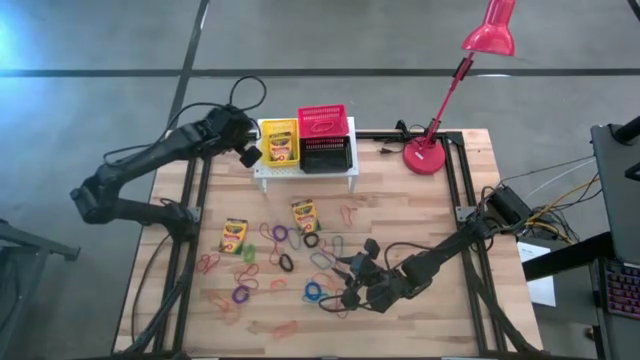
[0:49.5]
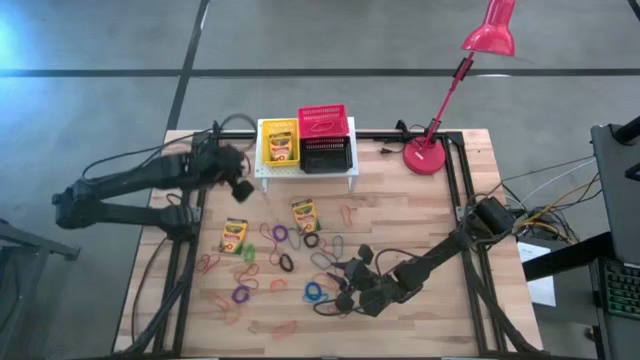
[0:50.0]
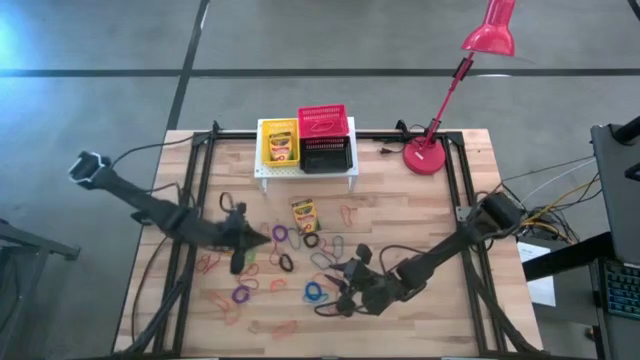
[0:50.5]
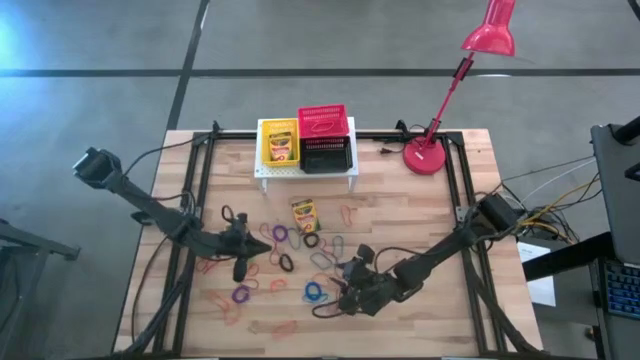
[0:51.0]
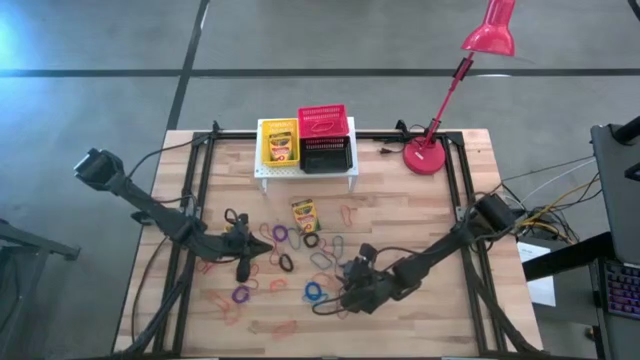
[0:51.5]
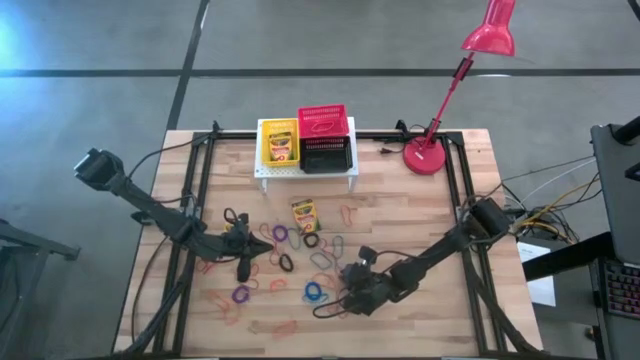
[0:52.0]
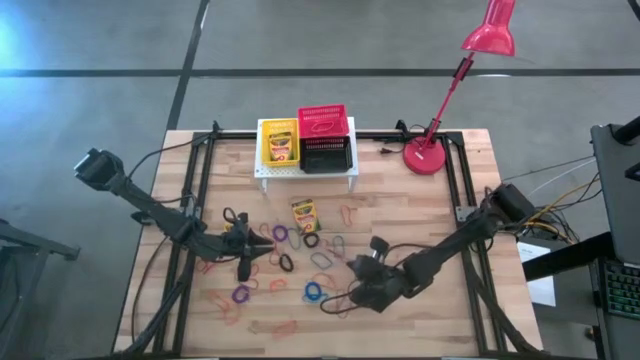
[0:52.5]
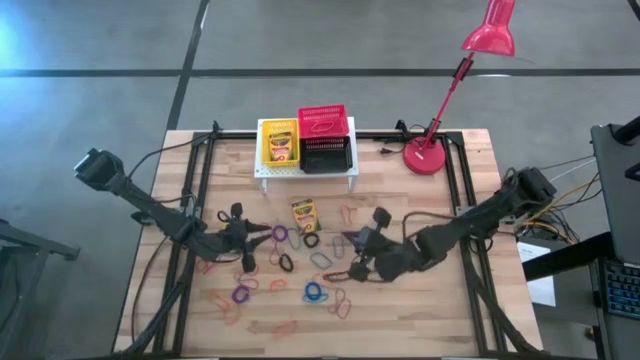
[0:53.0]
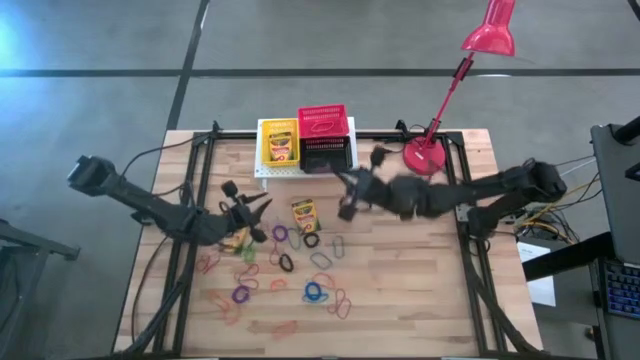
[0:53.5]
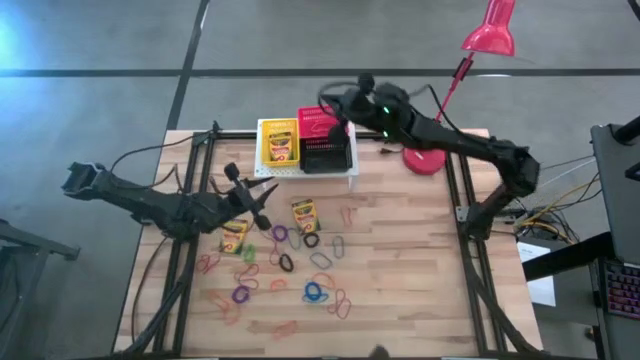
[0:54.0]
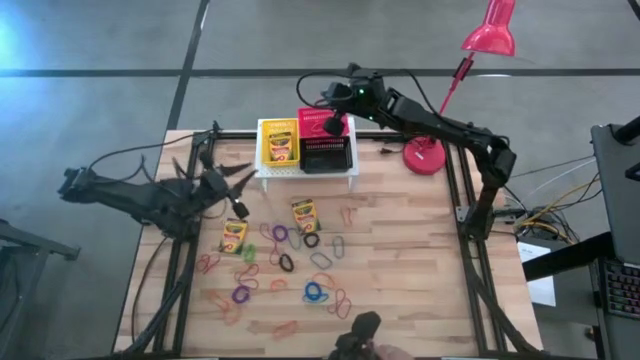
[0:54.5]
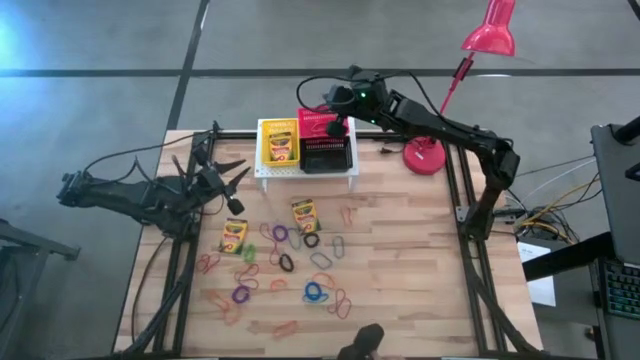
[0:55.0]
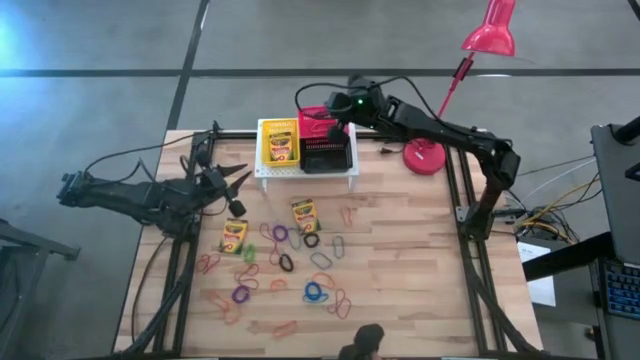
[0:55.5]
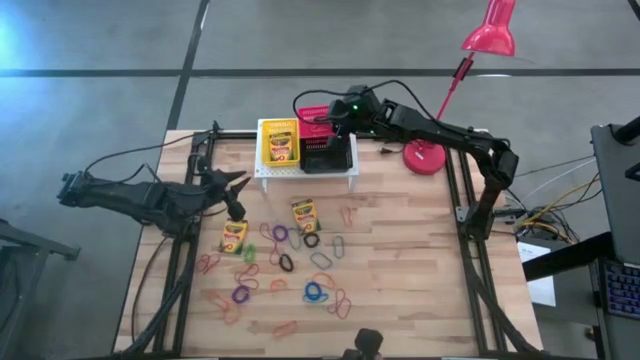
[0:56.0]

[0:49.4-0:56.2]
Task: Pick & Place Office Desk Supplies
Put the red rubber band into the red bin

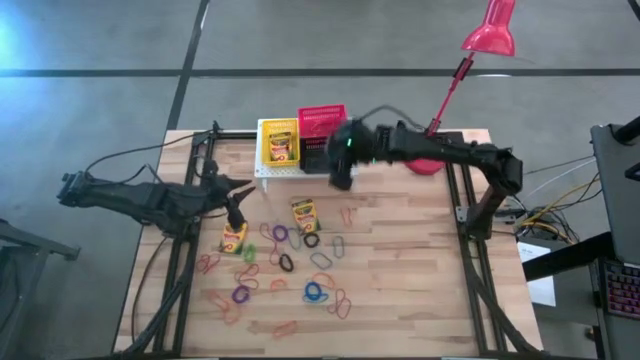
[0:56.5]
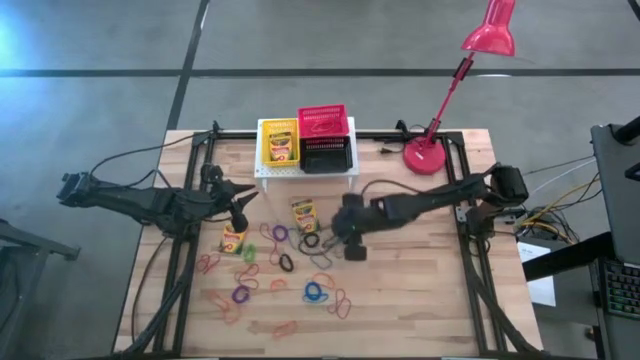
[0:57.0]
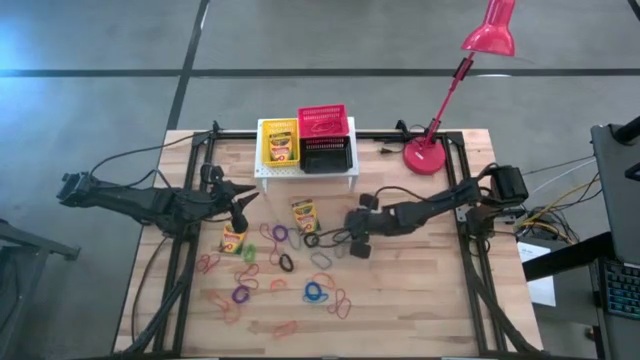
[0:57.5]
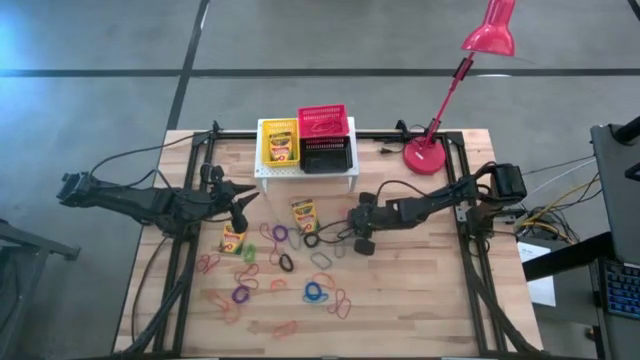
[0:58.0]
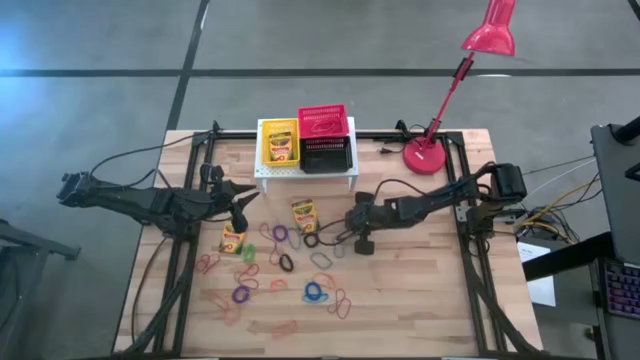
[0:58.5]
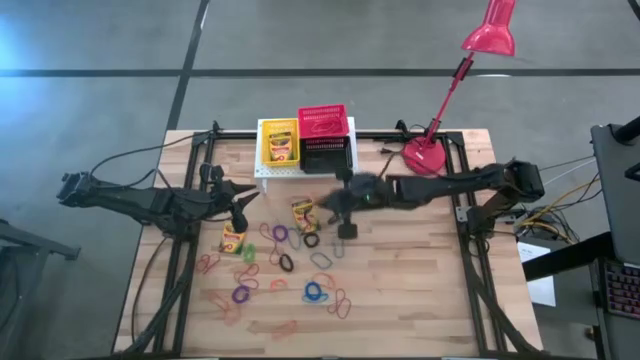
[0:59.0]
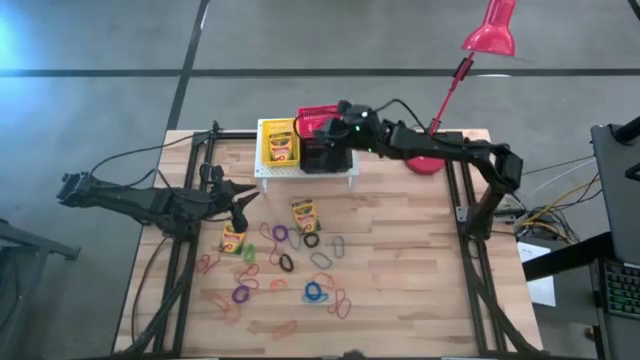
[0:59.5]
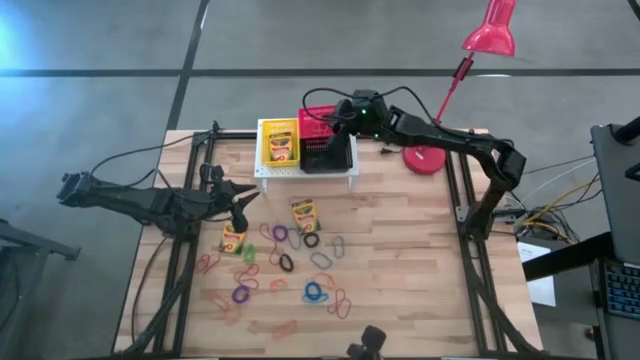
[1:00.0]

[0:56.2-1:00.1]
Put the orange rubber band into the red bin

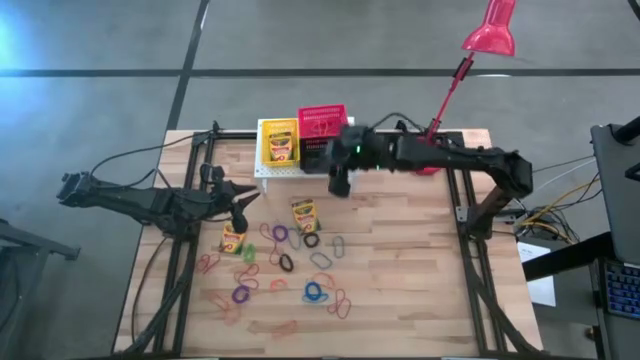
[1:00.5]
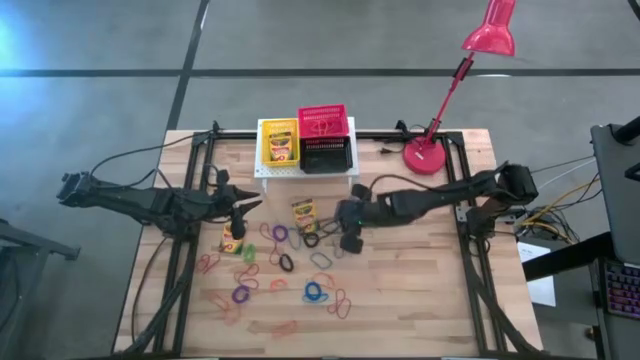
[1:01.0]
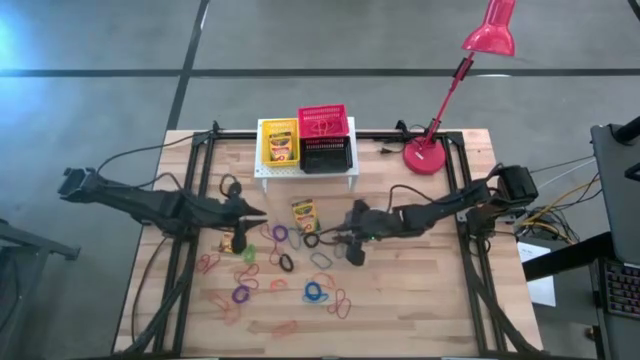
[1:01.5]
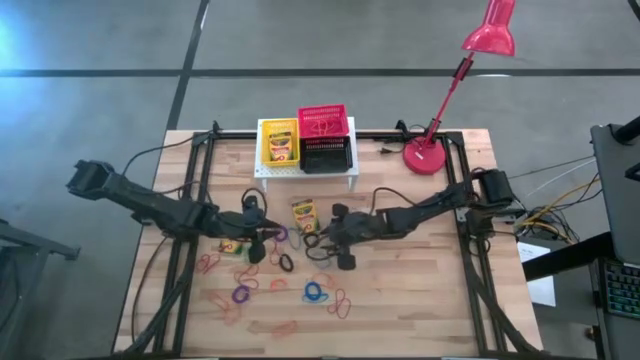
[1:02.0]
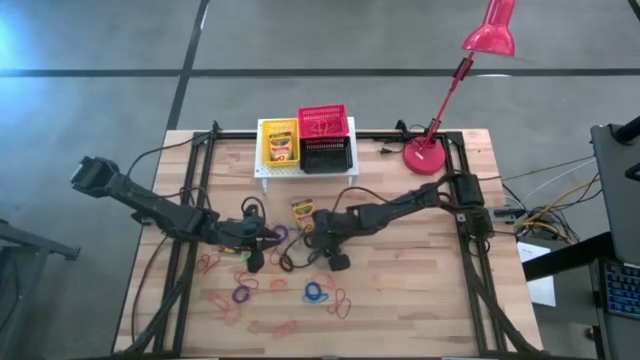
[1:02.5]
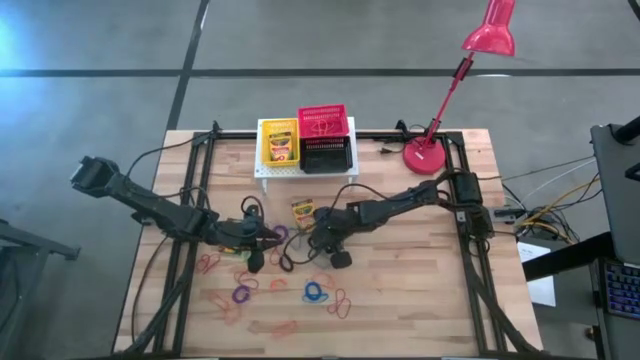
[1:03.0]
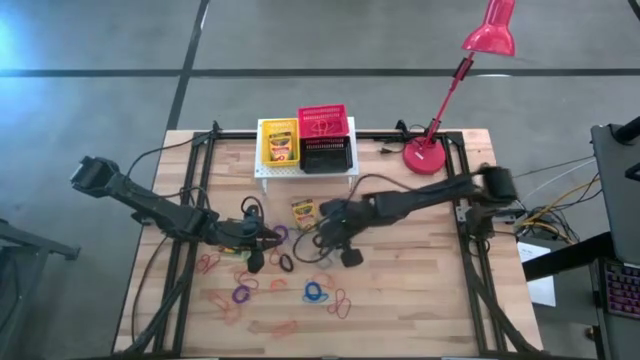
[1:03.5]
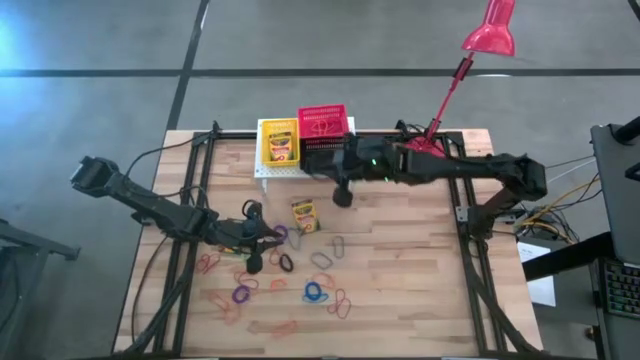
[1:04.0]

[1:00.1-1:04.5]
Put the black spring keychain into the black bin

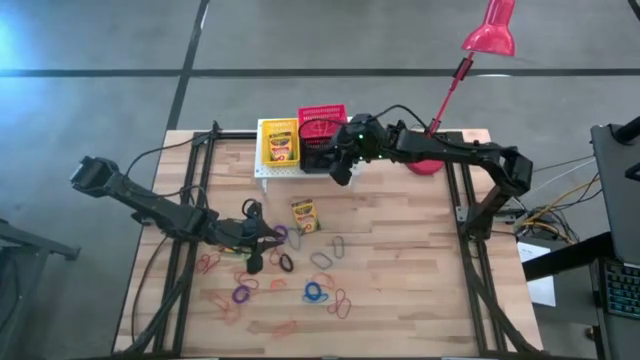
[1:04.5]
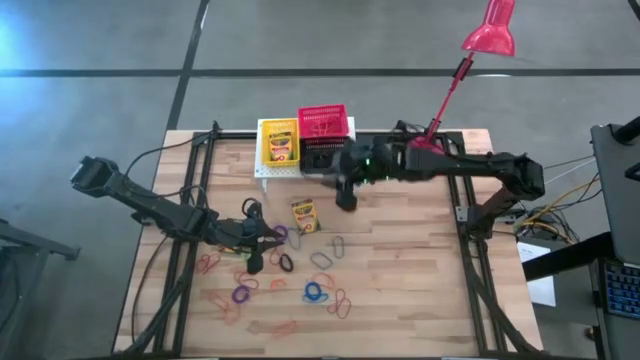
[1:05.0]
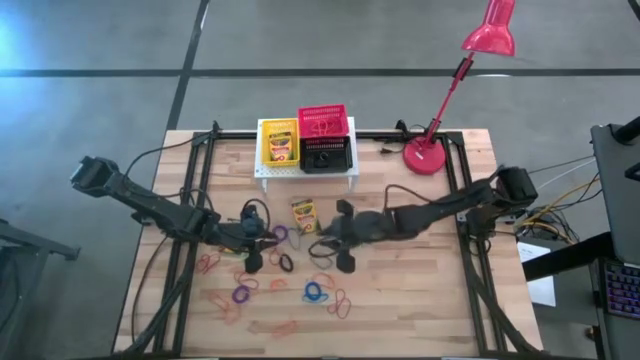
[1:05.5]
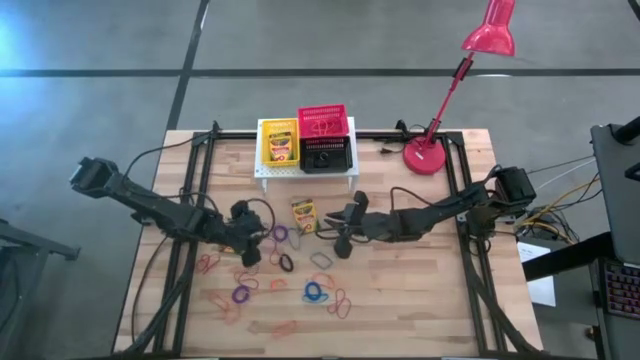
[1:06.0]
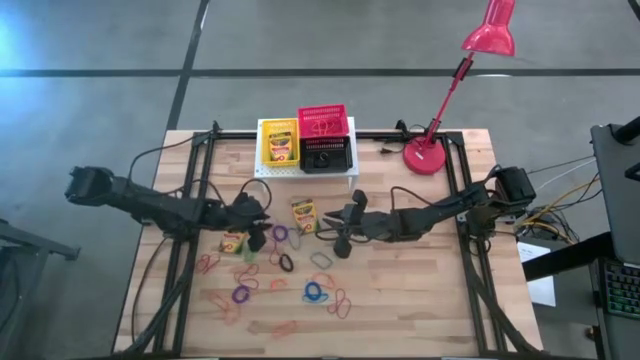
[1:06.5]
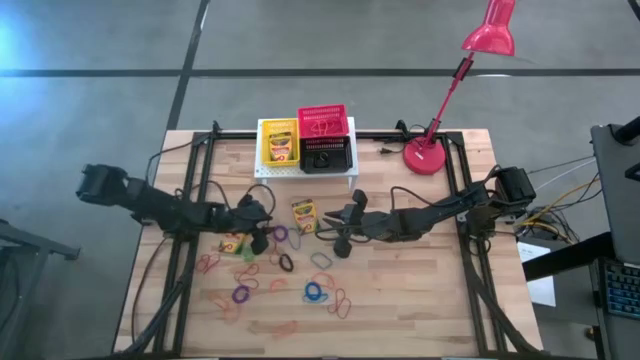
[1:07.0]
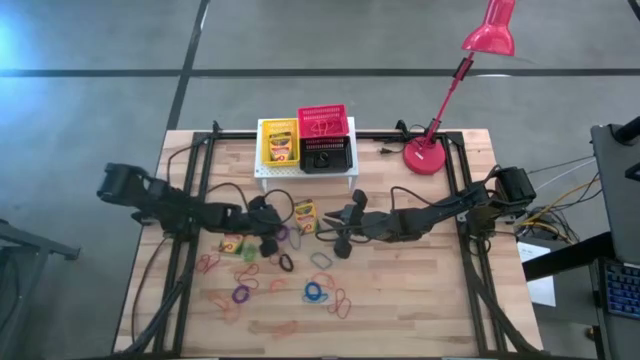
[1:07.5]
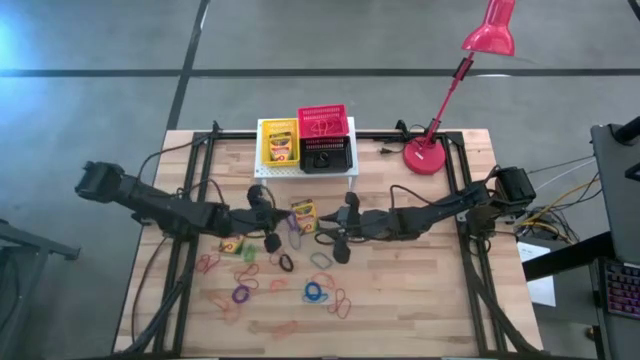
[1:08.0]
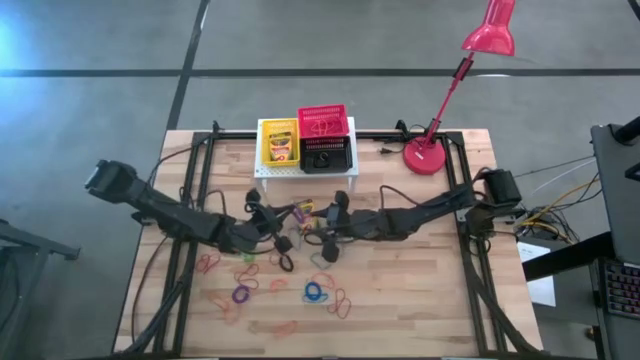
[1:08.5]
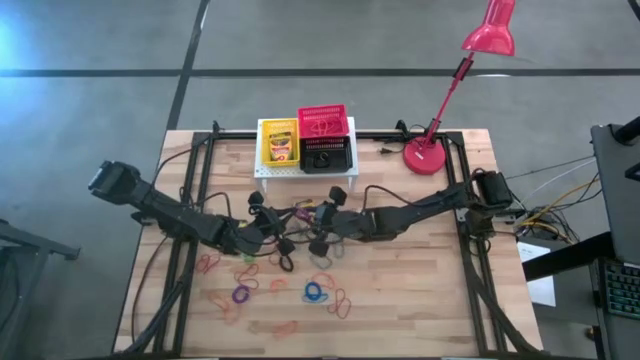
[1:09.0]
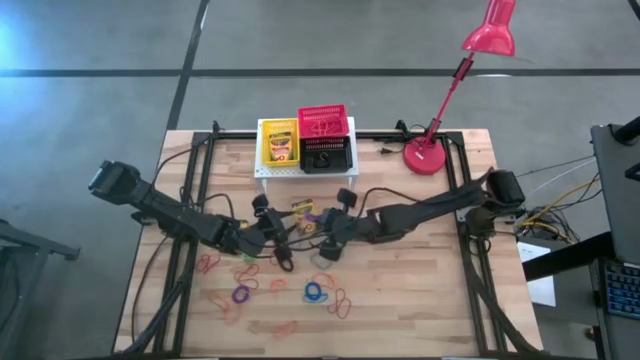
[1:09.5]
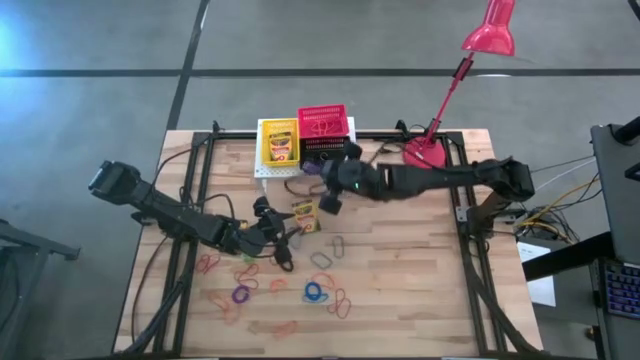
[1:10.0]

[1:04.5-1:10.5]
Put the purple spring keychain into the black bin

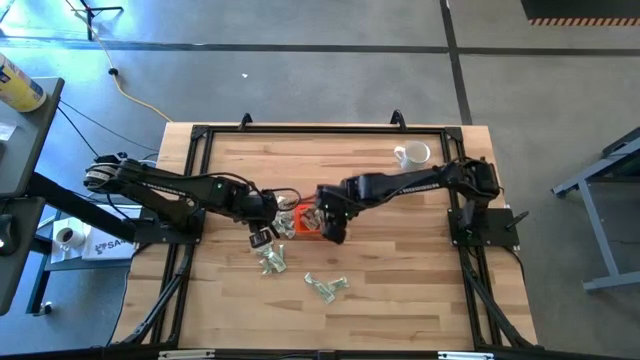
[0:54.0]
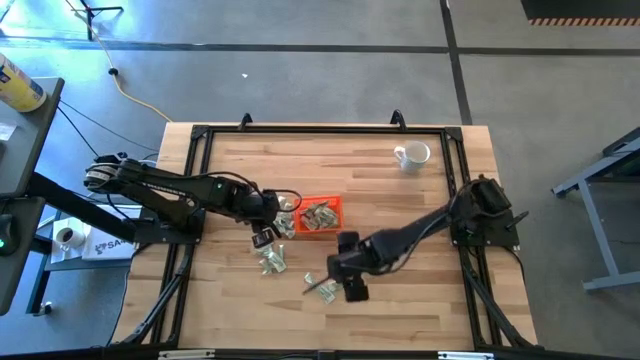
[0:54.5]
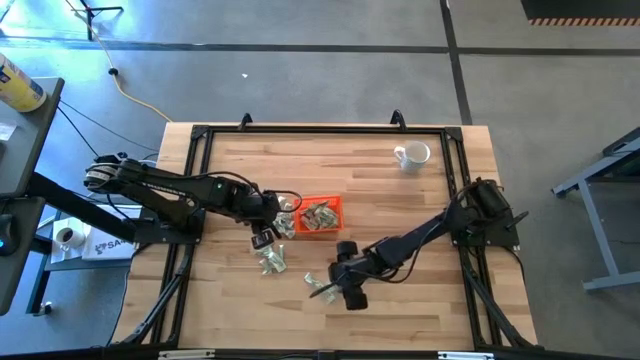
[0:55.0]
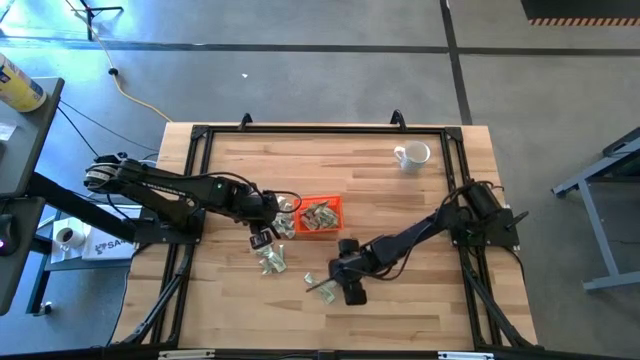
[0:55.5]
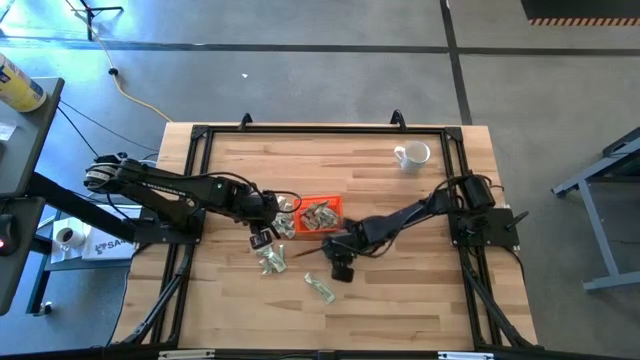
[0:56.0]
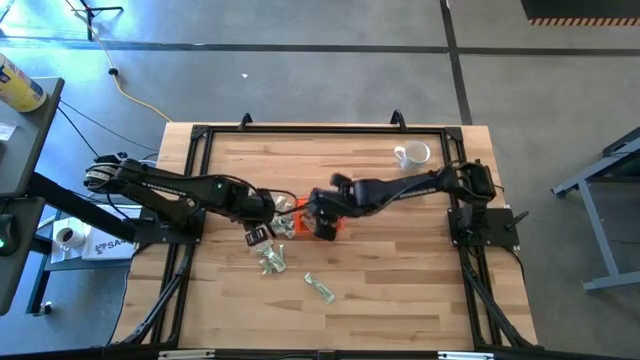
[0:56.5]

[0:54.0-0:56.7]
Task: Pick and place Stevia / Truvia into bins
Put the stevia packet into the orange bin
